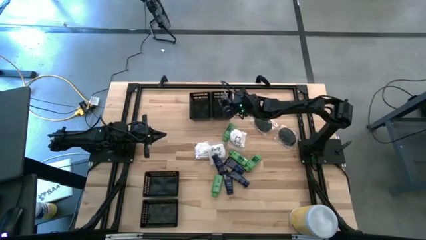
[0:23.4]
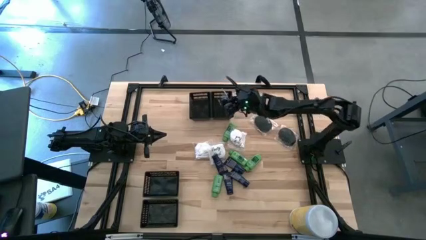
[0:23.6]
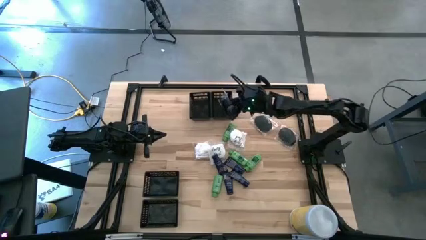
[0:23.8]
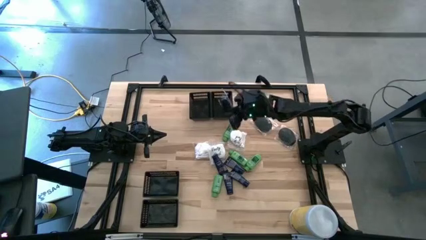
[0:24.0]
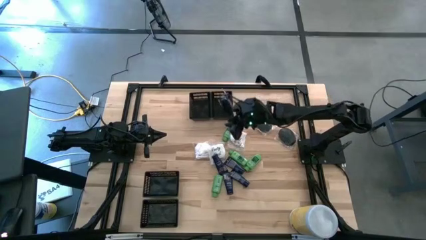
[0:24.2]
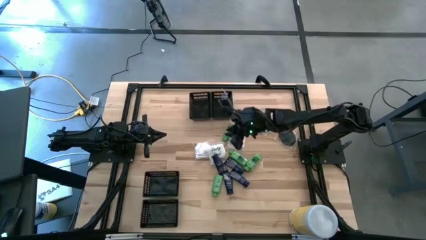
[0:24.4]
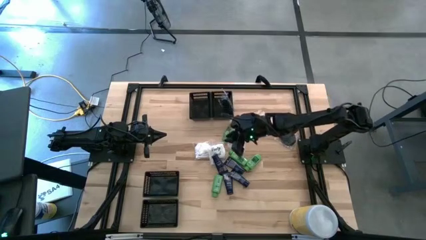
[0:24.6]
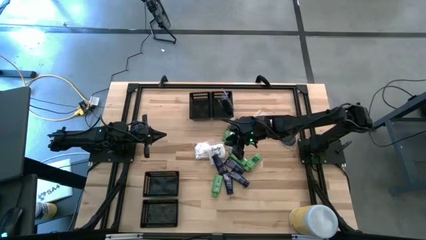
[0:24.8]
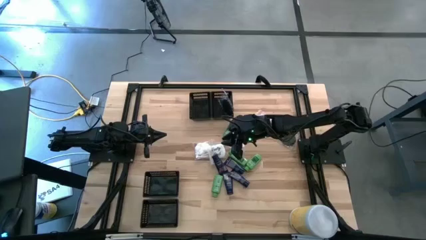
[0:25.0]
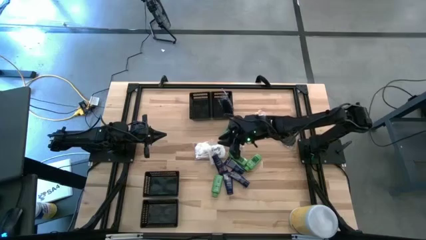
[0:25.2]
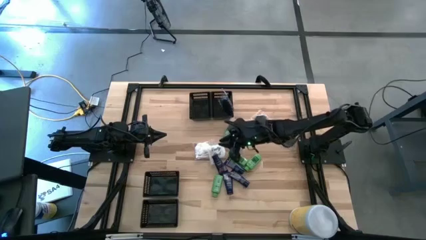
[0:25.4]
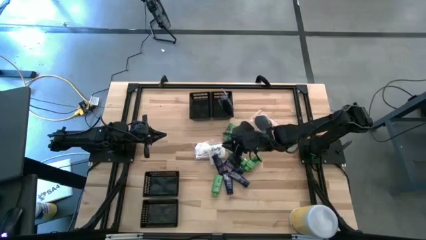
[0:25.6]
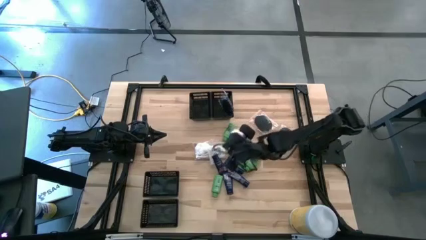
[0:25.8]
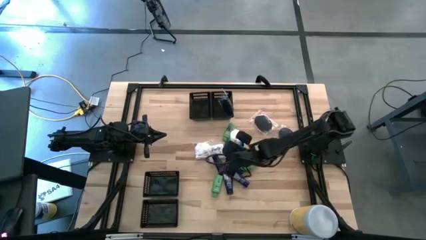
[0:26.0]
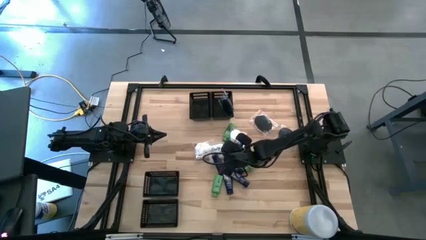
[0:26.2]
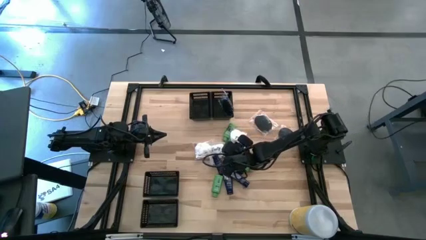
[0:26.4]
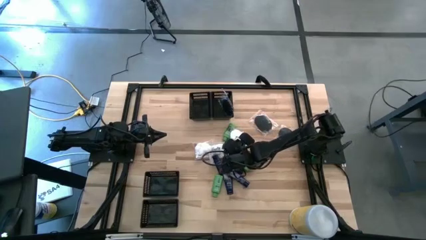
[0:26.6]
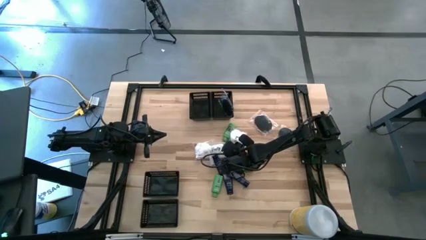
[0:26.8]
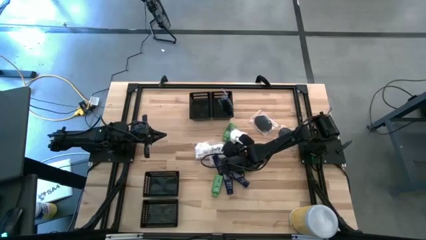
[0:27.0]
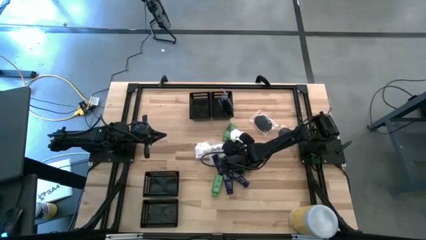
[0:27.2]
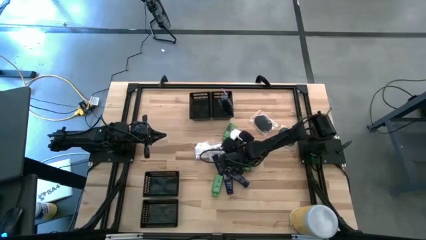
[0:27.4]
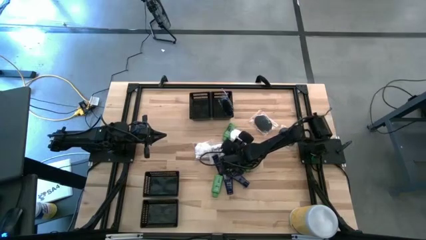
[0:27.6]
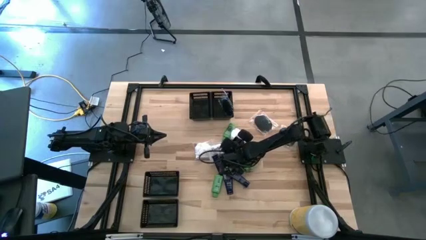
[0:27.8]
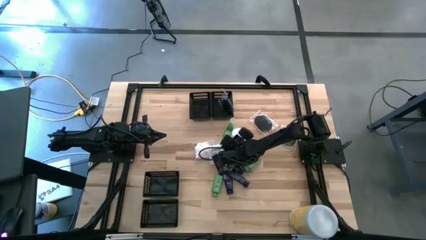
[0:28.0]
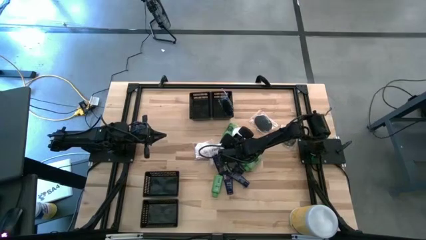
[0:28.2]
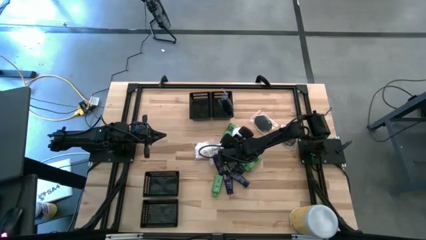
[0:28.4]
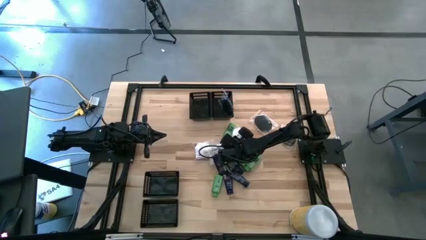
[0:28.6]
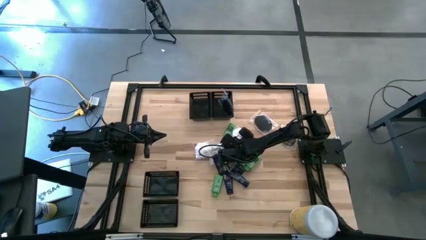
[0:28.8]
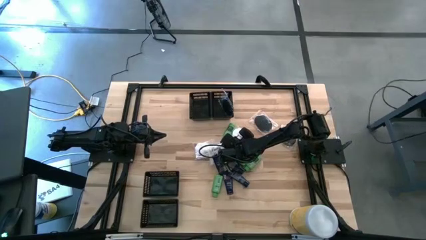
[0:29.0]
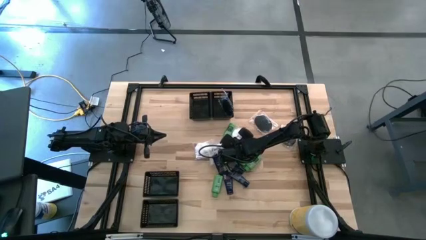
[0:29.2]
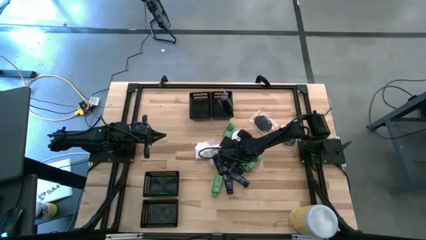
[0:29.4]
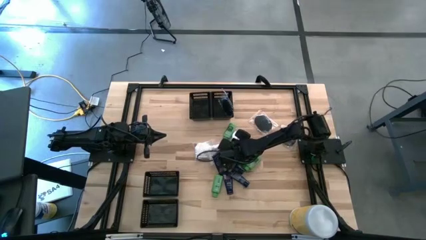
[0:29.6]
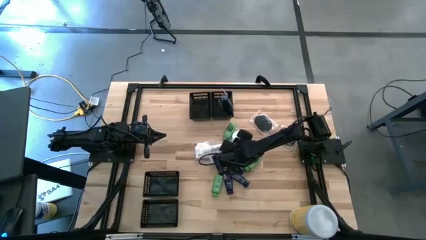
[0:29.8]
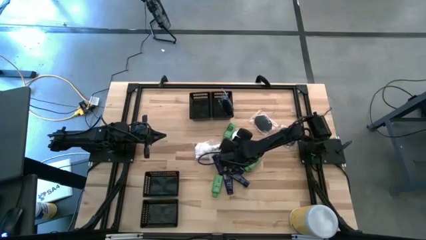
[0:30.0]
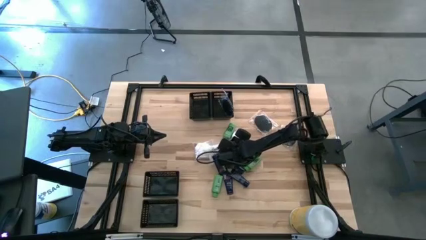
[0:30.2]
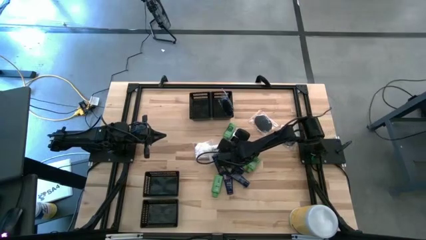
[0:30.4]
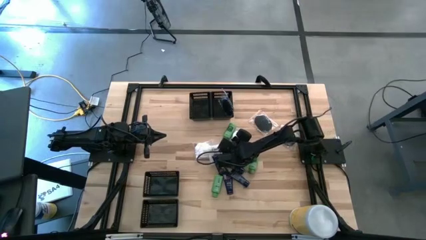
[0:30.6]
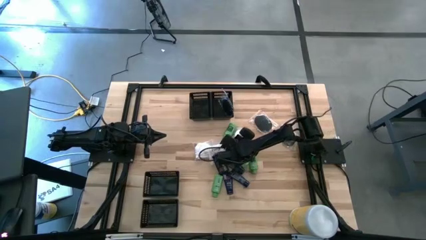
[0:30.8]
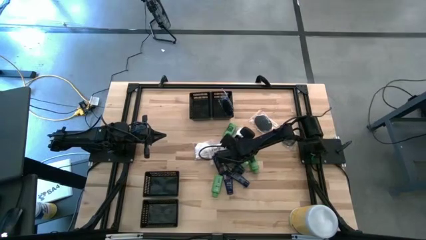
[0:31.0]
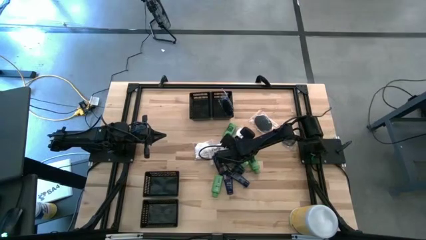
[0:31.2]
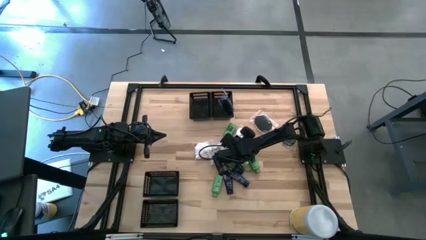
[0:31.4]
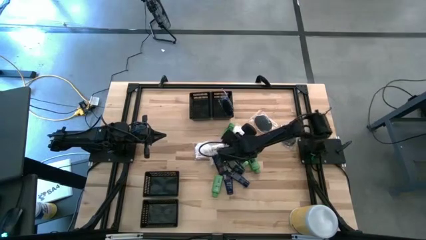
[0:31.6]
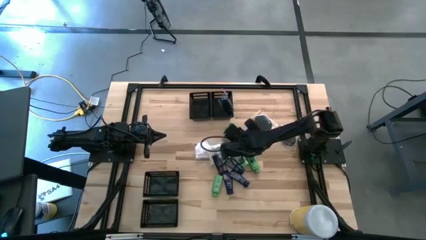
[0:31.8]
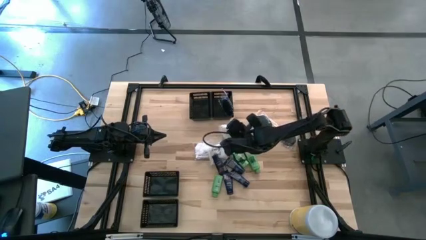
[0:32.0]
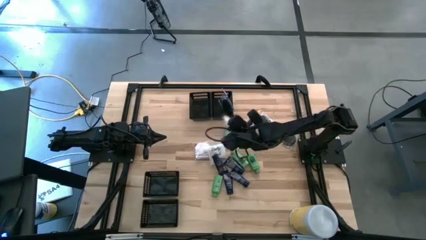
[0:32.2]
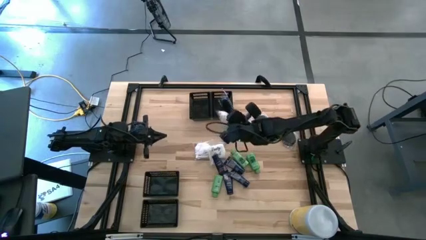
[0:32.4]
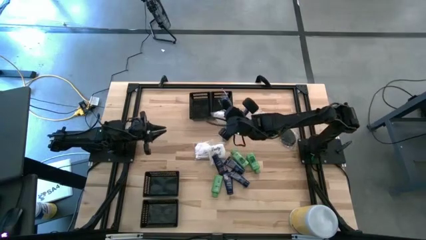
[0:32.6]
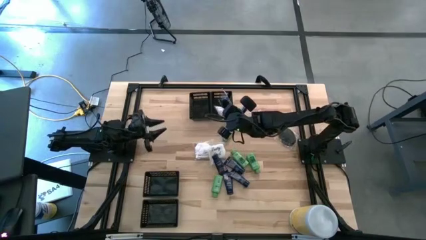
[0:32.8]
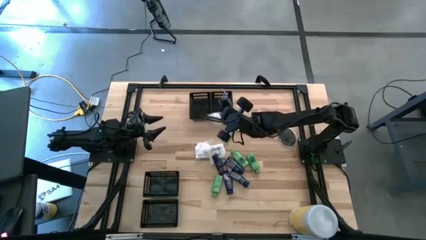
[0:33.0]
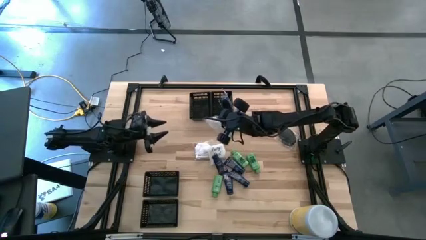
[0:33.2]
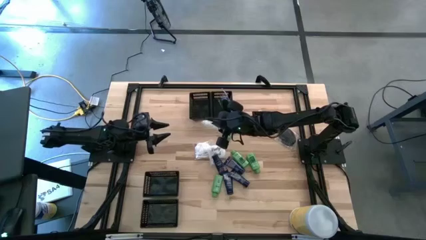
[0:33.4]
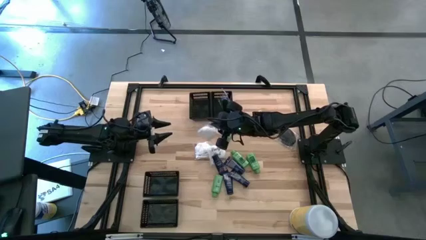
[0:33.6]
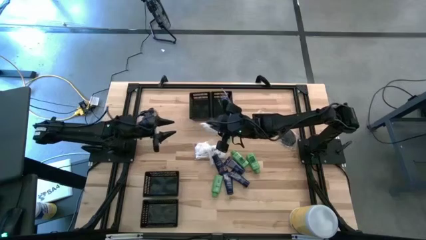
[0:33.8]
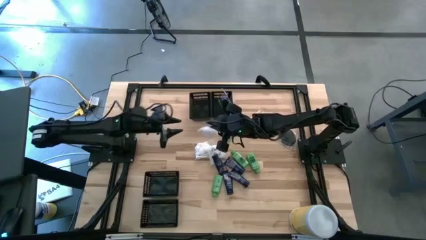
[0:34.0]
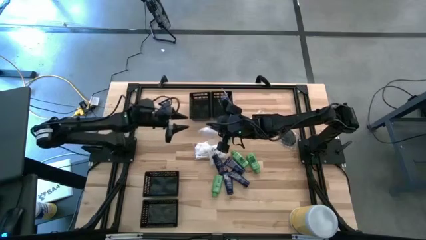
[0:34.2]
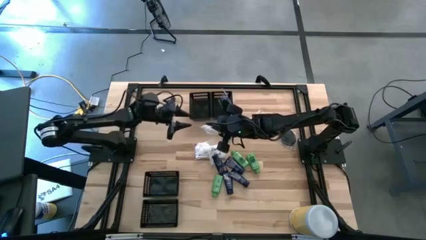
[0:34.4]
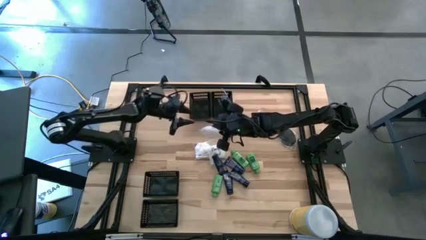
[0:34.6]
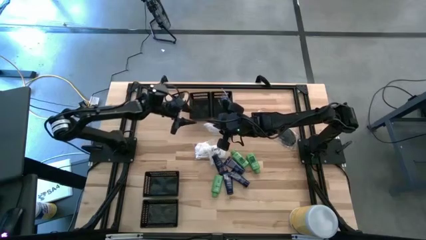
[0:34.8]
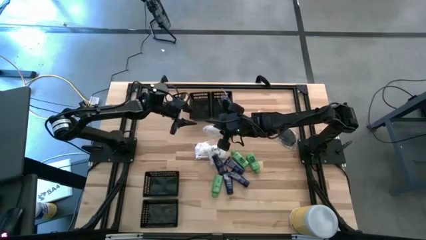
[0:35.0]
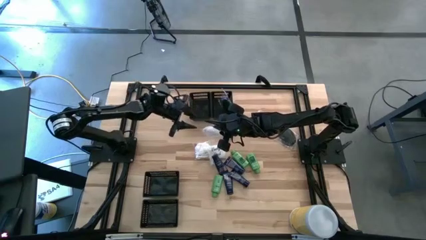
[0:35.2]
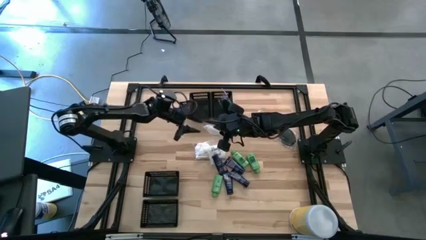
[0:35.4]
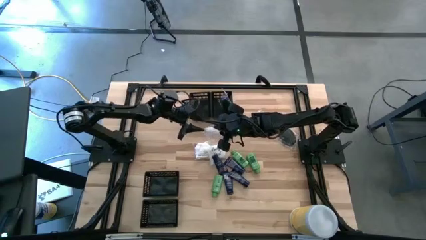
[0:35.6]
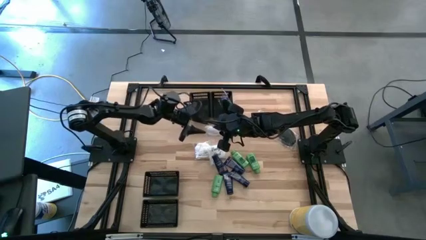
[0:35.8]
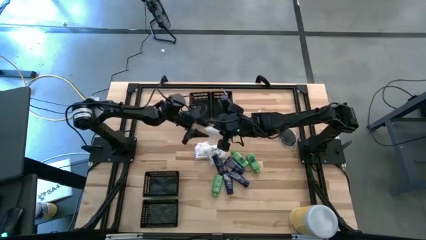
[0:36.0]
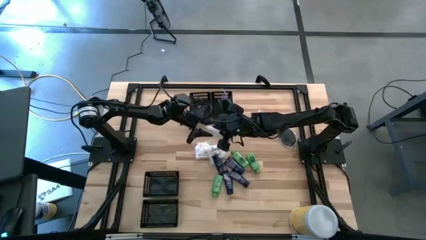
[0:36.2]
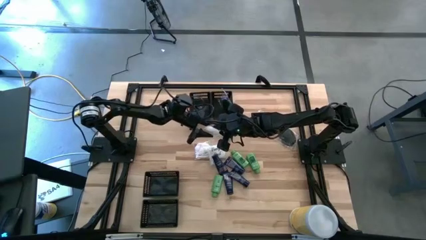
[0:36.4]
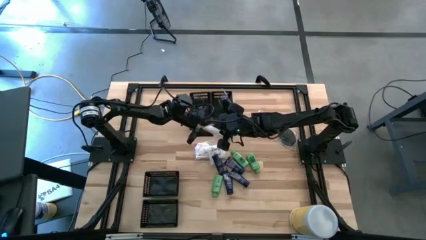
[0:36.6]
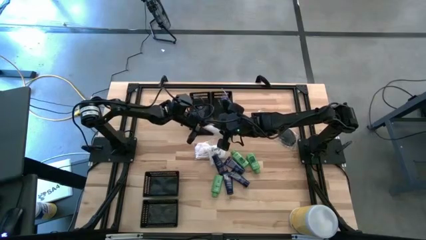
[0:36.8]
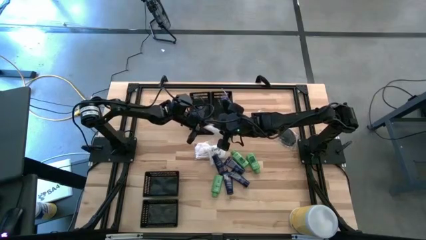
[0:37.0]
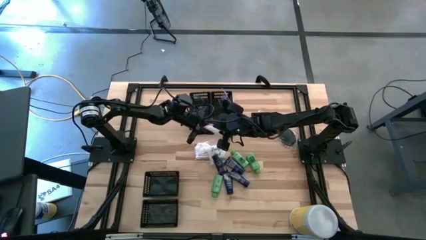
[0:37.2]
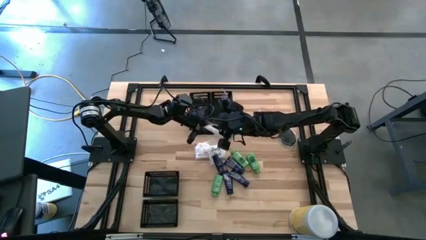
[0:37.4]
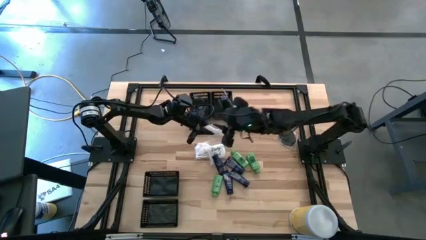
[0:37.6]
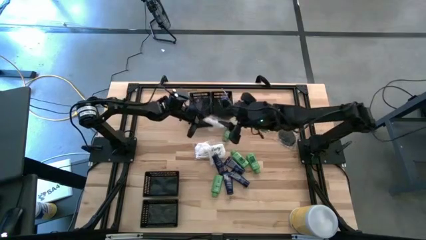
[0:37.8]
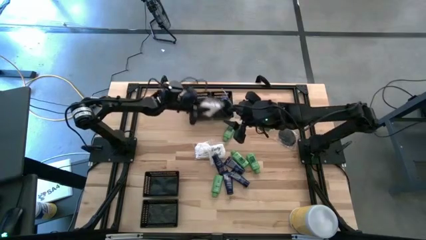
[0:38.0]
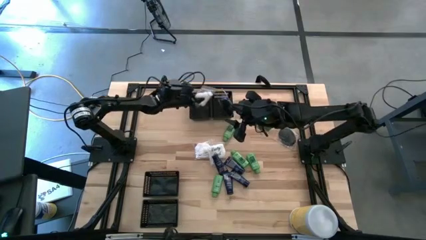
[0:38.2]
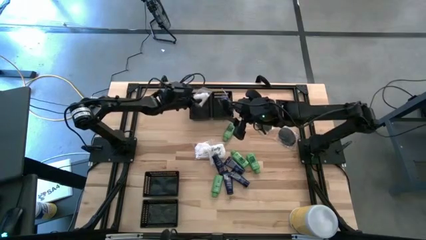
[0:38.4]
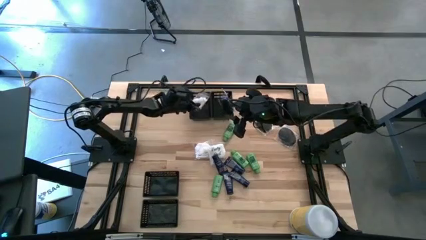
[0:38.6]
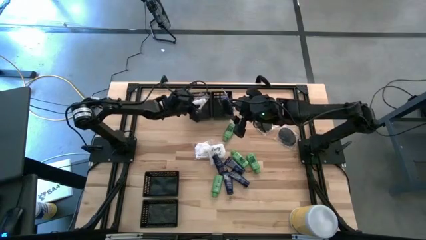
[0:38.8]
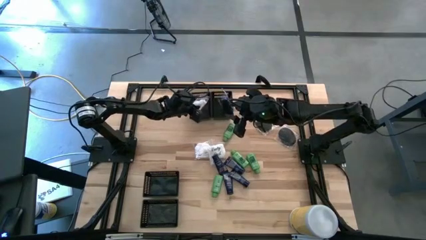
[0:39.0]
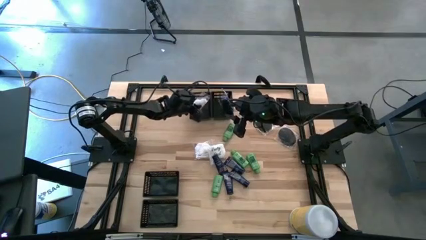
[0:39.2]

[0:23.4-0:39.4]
Task: Pick & Place Travel size toiletries
Put the white cotton pack into the top middle basket

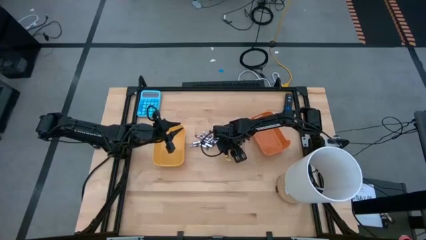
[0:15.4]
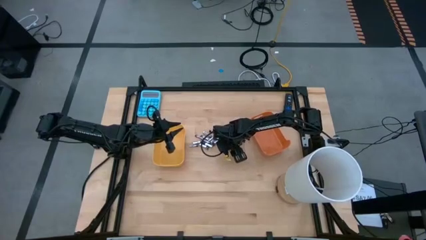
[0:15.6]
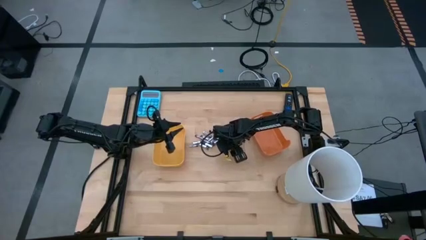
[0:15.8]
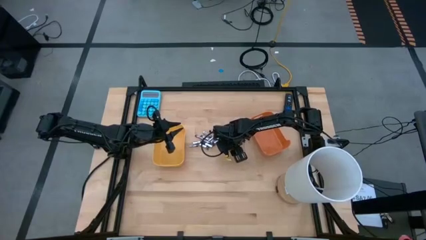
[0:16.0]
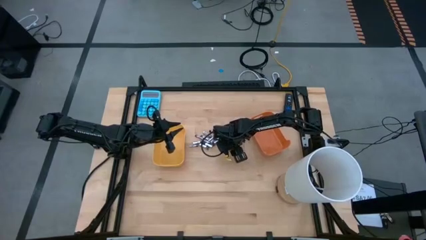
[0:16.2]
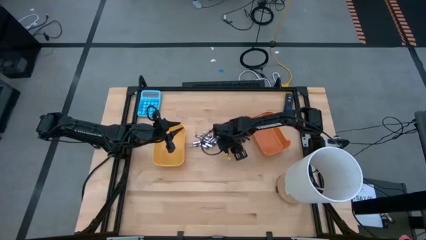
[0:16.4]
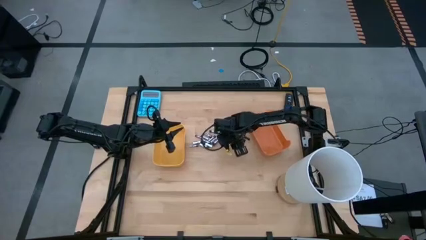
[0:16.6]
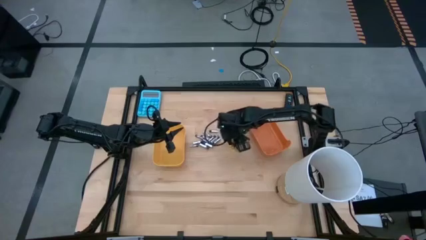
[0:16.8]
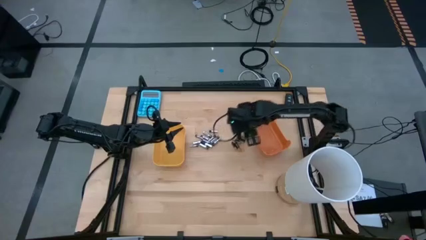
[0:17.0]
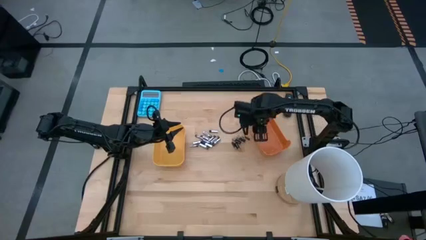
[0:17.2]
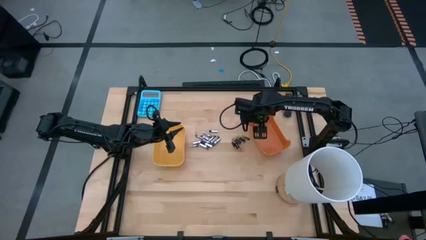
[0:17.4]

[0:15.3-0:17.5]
Task: Sort batteries
Put the black battery into the orange bin
